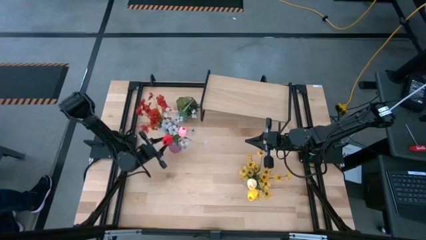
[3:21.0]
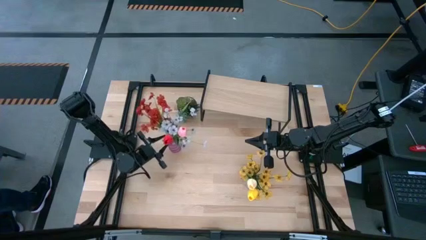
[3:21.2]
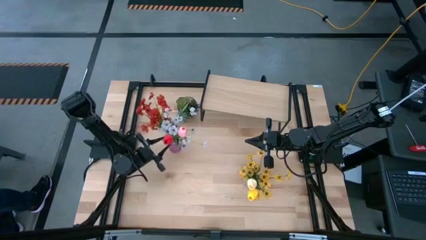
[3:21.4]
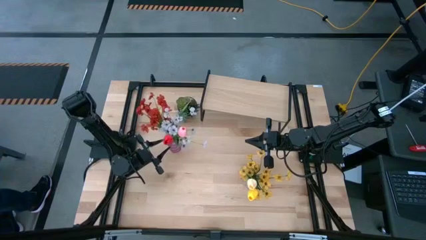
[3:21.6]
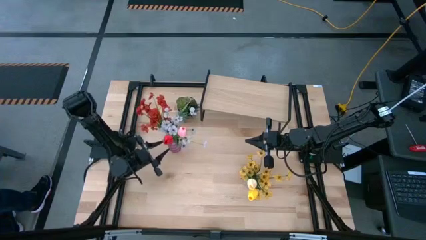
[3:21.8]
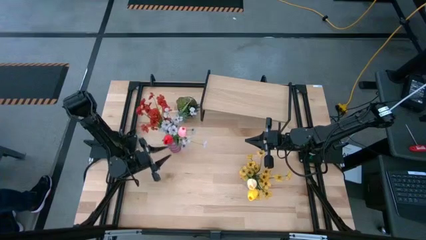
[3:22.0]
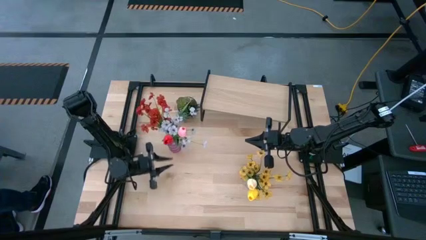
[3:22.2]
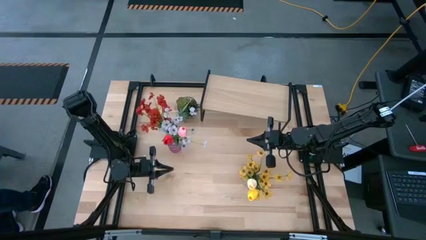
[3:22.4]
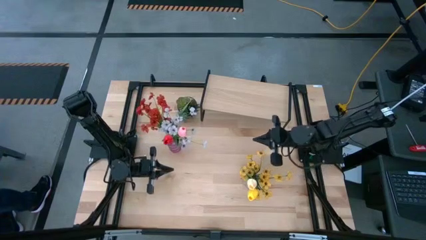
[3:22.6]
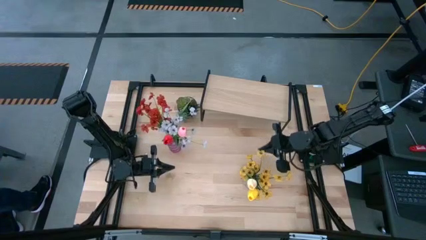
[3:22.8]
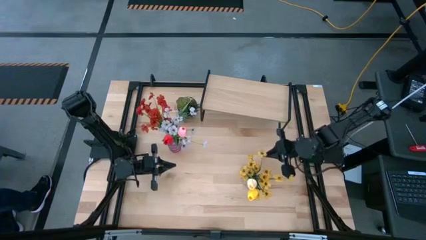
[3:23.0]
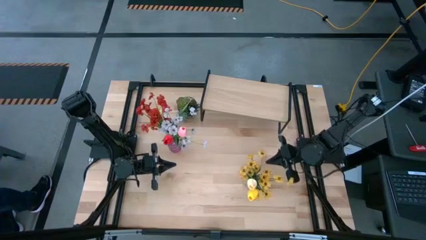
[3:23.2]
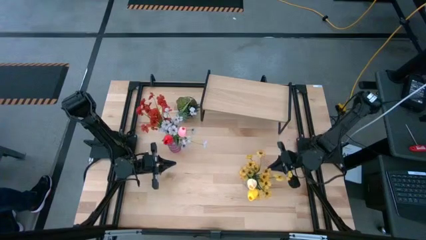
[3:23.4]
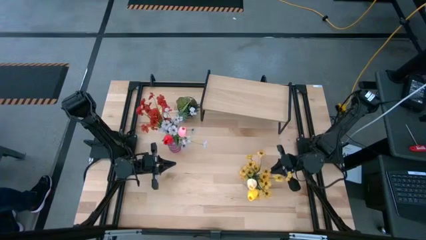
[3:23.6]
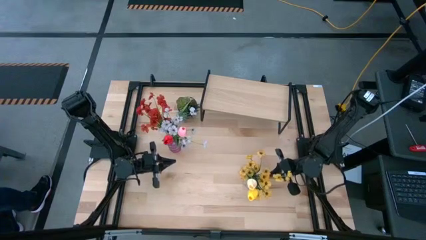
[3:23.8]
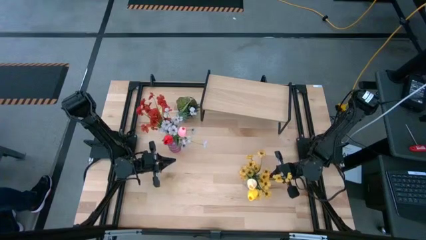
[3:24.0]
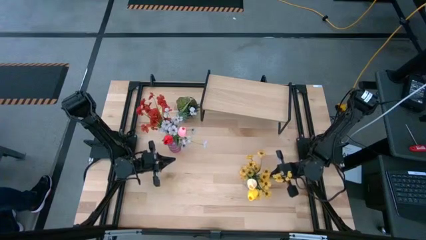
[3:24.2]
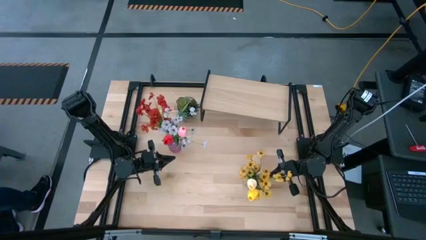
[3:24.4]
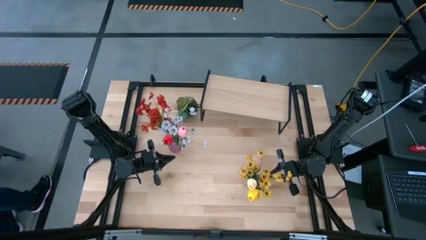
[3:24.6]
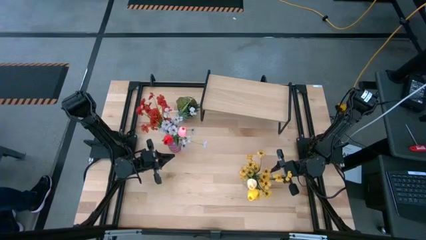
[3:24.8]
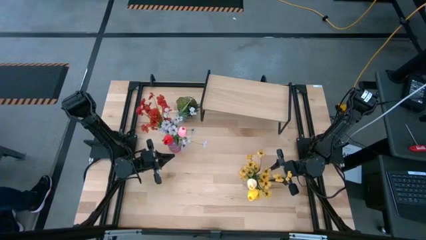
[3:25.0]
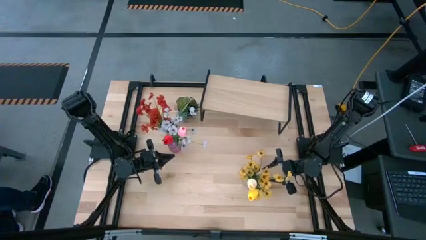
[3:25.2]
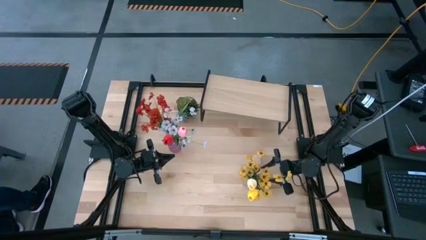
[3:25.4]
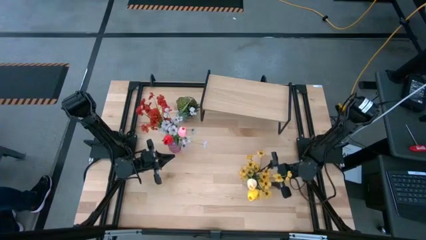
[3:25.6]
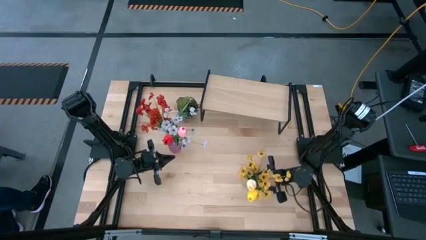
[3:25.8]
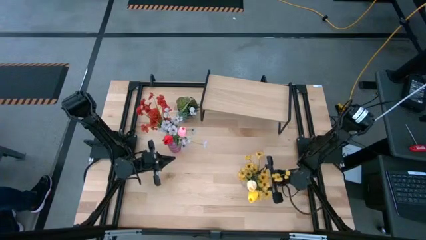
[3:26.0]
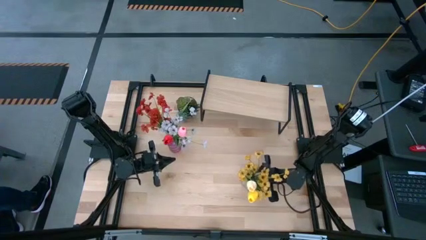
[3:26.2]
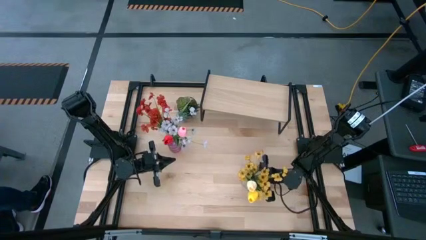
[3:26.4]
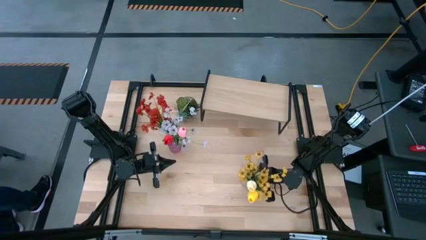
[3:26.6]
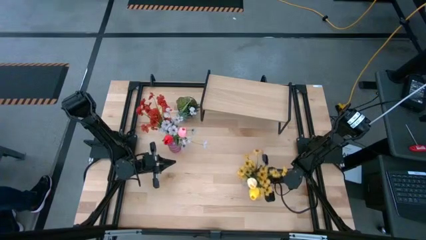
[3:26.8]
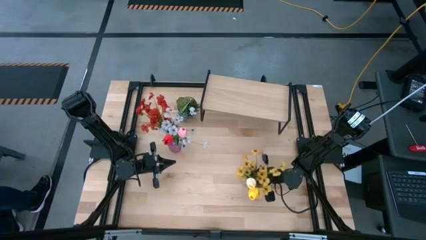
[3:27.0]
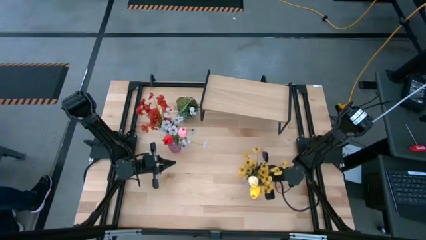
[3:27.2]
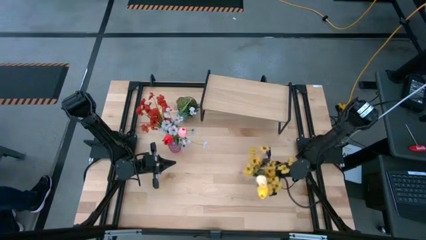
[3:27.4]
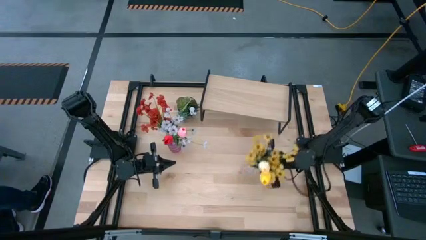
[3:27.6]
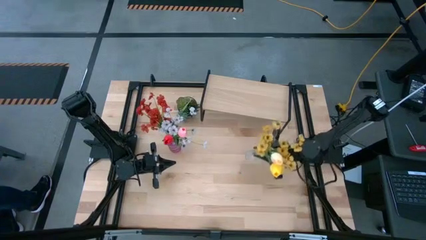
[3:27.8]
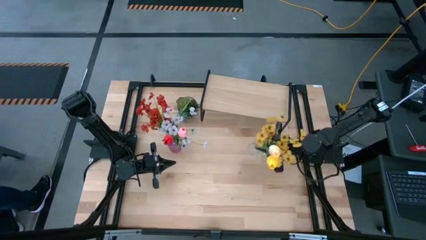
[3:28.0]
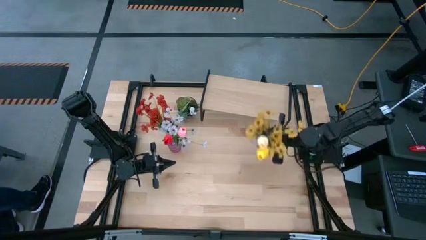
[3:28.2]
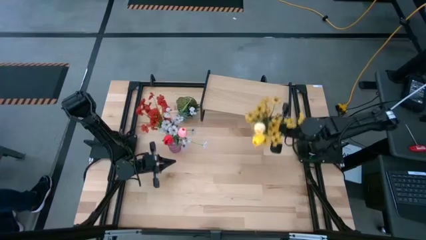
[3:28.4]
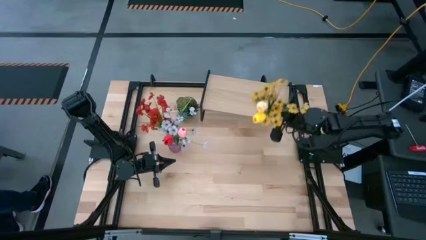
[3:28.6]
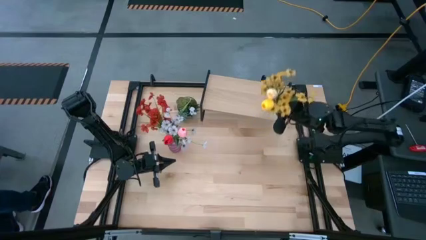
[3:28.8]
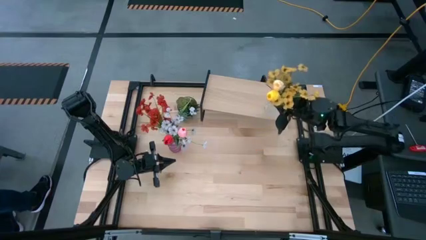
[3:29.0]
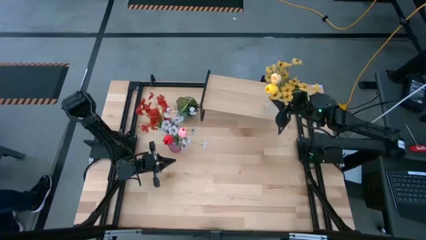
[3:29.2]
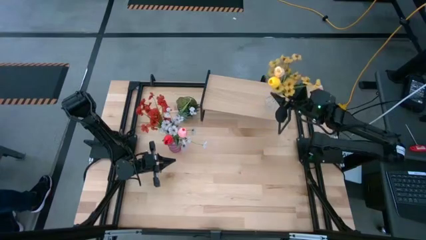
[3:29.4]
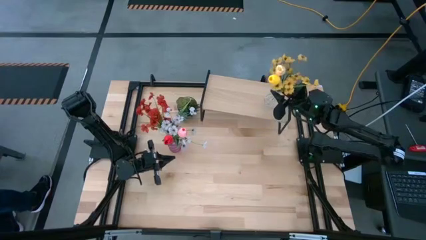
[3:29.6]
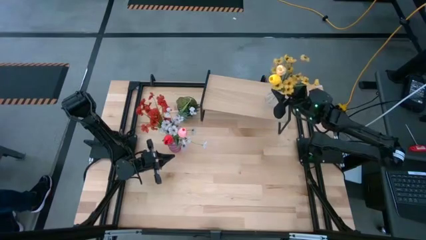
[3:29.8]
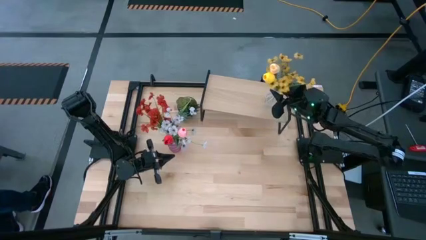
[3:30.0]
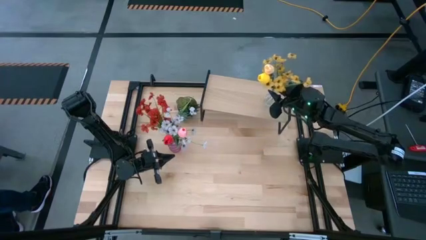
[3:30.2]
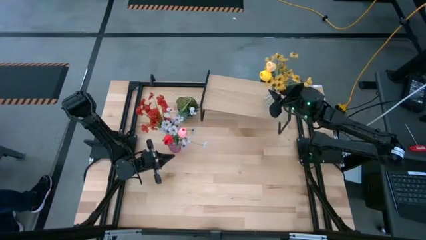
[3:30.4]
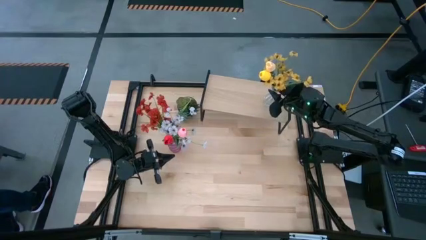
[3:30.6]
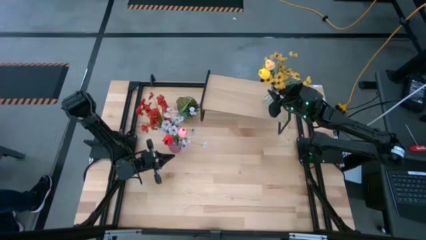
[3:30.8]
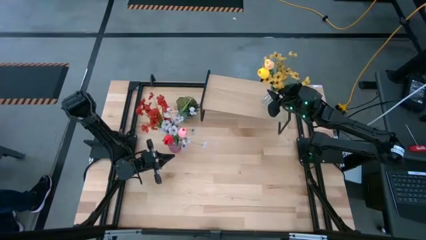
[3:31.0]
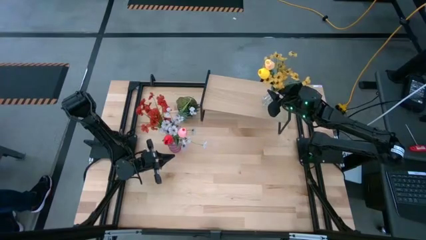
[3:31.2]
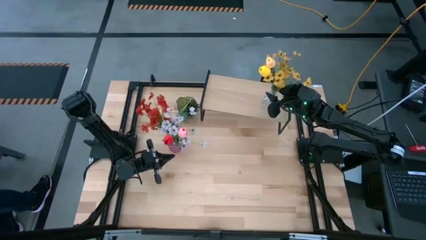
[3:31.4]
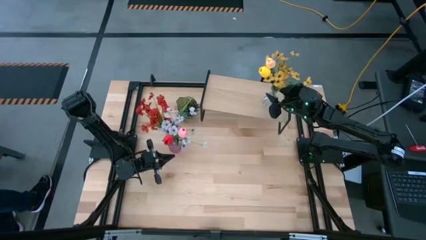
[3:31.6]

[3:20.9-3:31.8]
Task: Pick and place flowers into a vace then onto a shelf
Put the transparent vase with flowers on the shelf

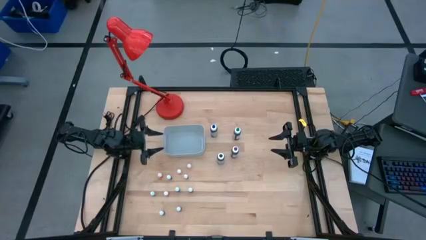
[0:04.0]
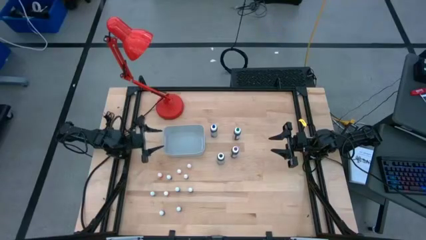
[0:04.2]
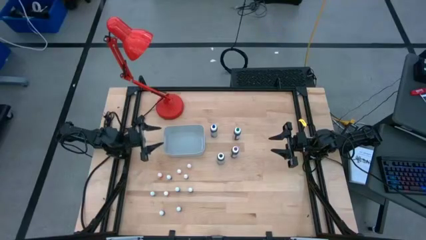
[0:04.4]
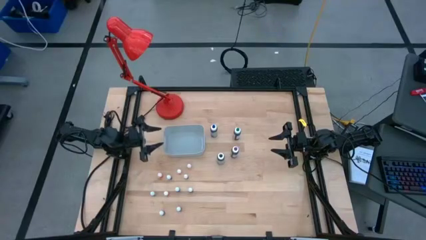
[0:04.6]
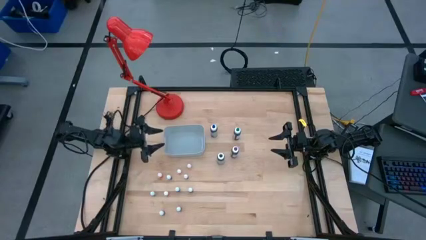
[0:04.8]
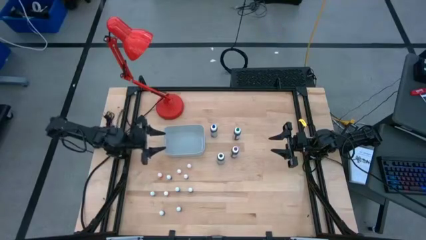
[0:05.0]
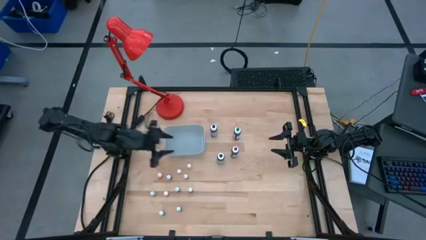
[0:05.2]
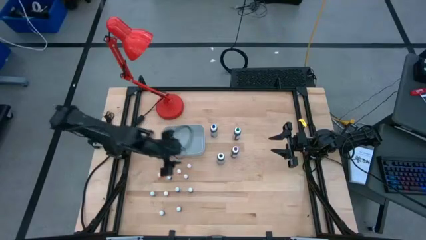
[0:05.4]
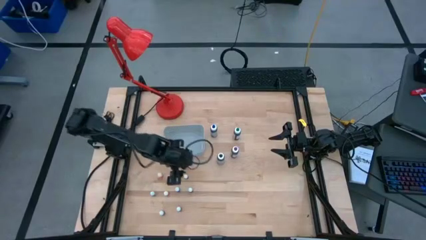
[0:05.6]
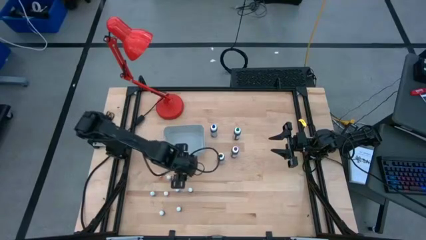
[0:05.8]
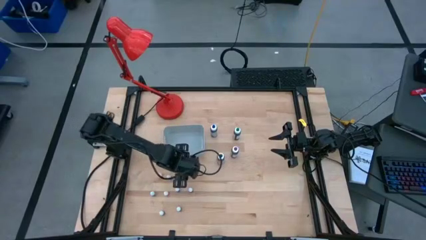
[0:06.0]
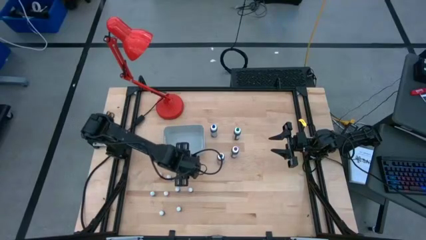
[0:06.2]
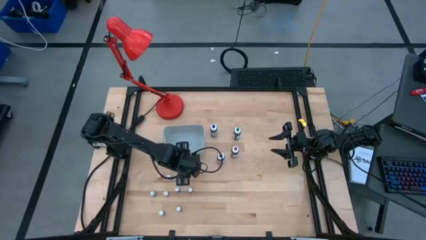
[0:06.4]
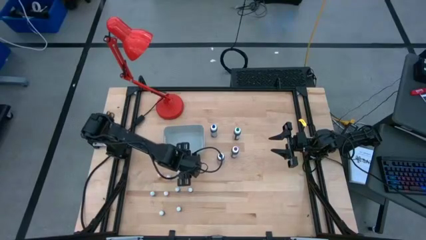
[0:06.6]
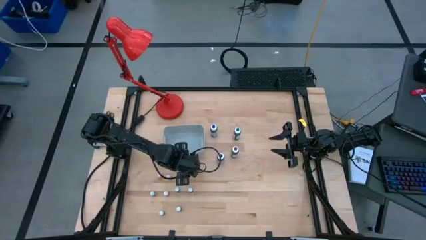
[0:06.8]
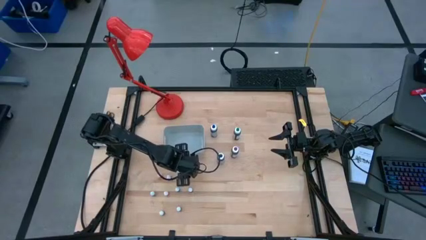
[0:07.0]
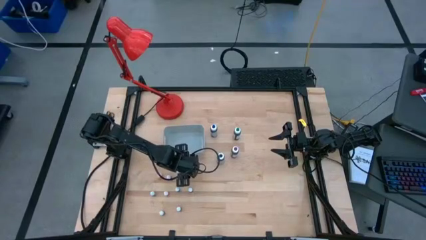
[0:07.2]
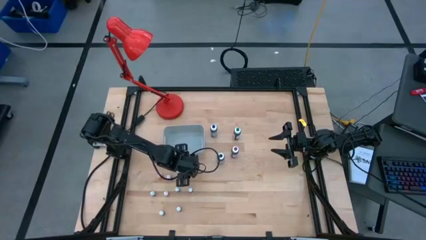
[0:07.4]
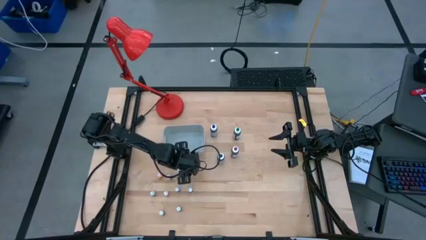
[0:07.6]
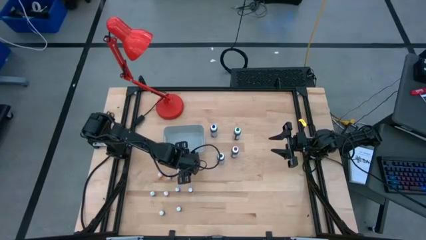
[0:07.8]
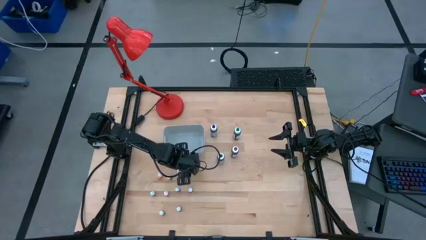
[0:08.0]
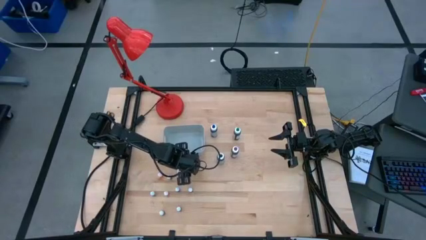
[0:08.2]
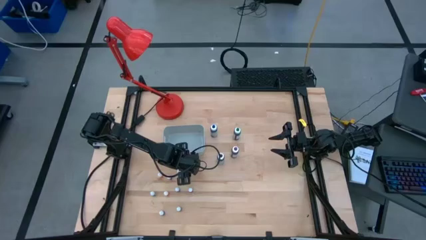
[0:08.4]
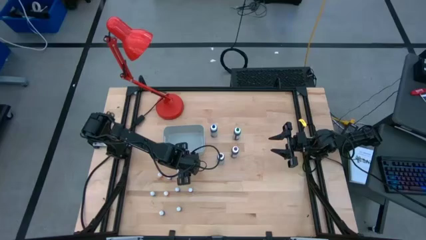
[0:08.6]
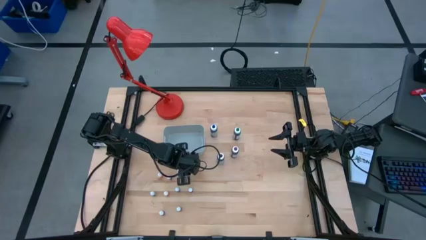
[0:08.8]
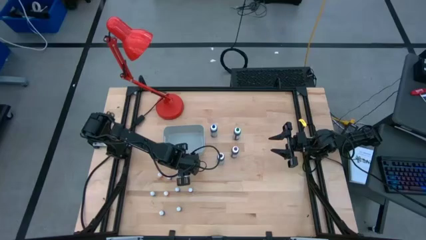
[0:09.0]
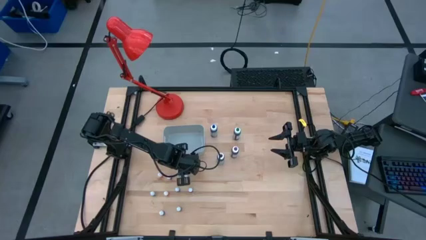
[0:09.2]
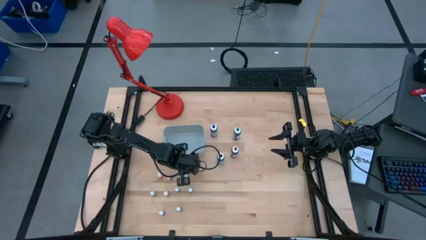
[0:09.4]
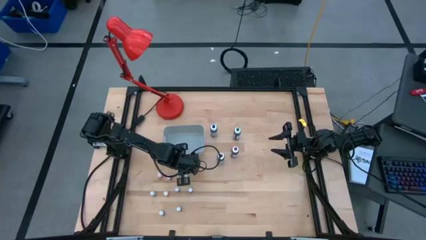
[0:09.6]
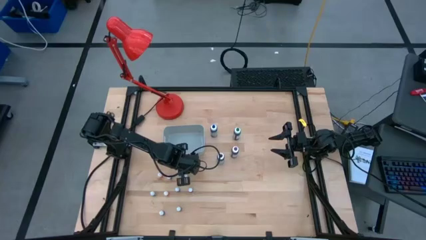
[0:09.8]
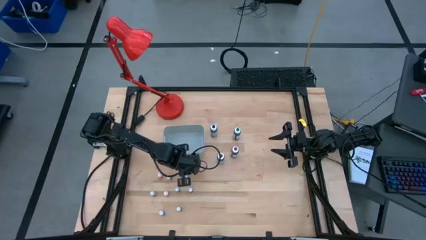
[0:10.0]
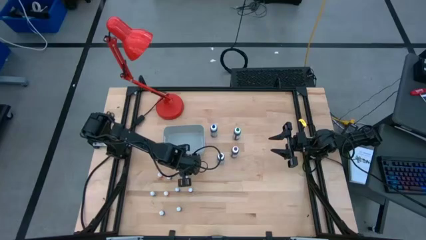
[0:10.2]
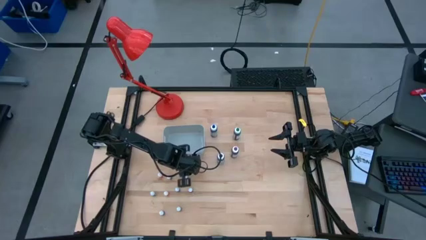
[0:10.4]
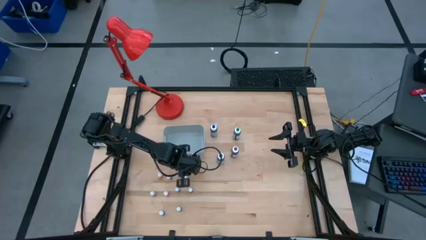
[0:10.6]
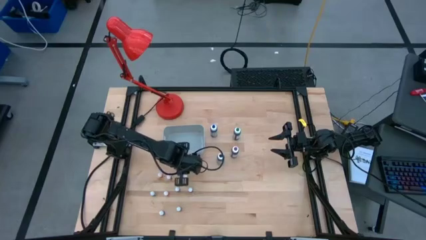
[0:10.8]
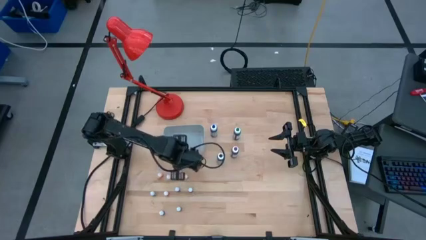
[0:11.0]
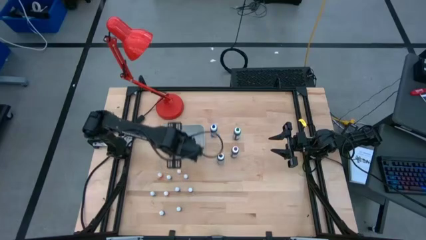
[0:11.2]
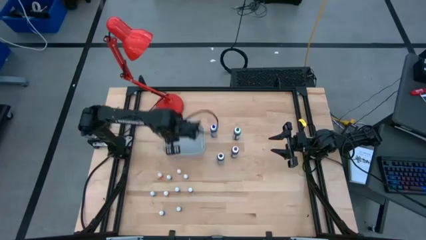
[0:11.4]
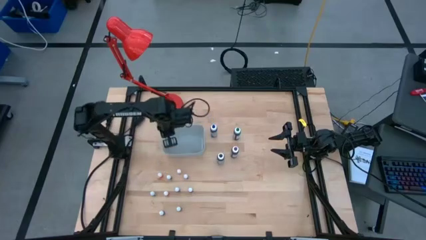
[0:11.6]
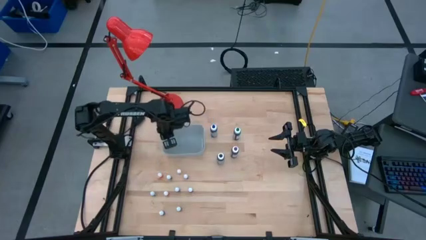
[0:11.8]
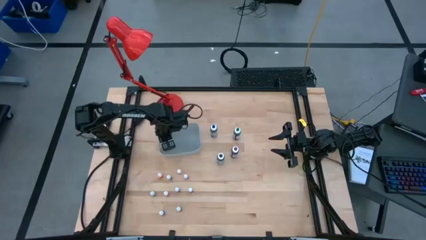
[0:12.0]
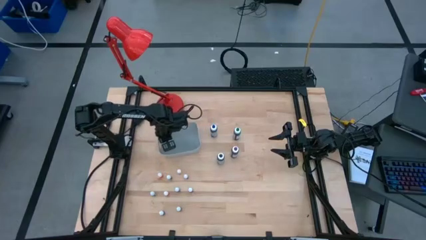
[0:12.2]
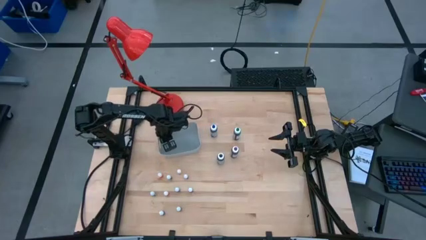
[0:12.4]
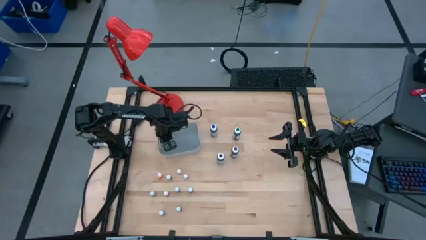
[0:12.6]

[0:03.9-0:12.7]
Task: Pick & Place food coloring
Put the small orange coloring bottle into the gray container
